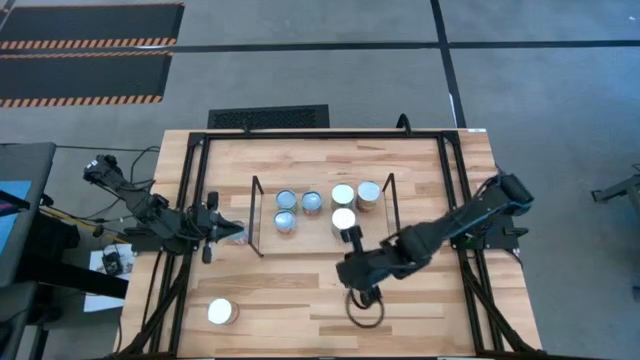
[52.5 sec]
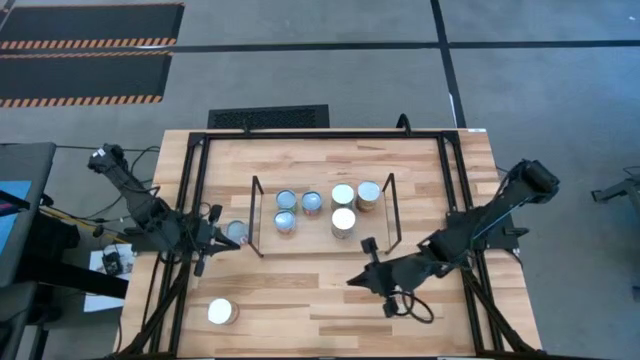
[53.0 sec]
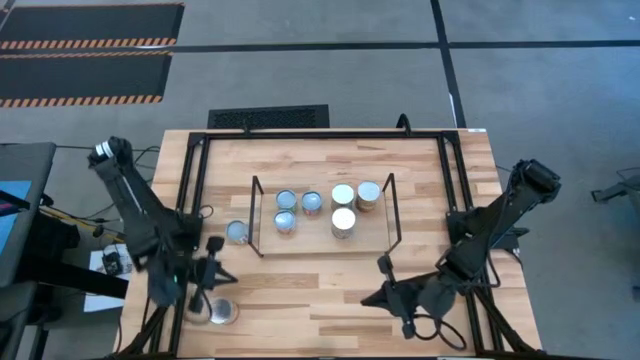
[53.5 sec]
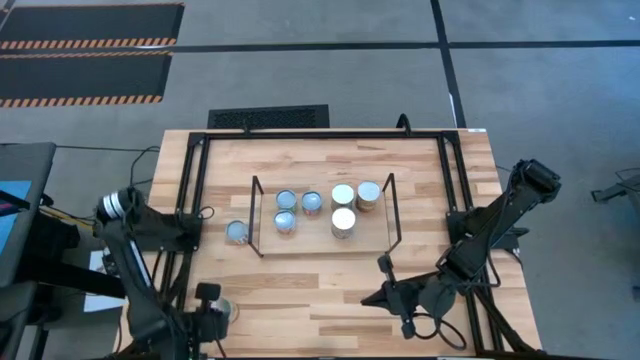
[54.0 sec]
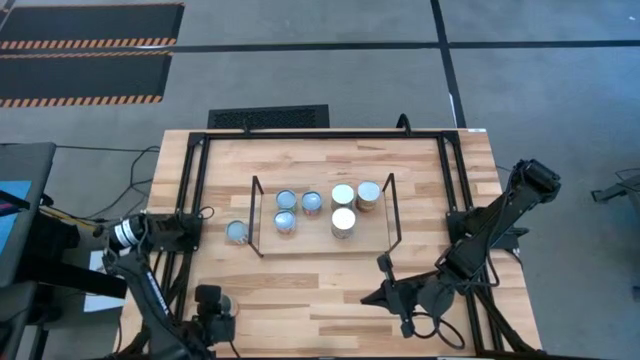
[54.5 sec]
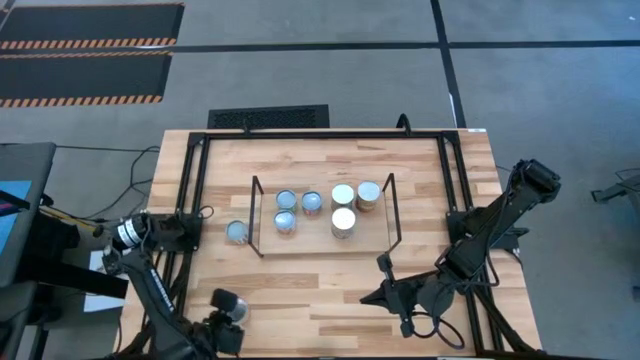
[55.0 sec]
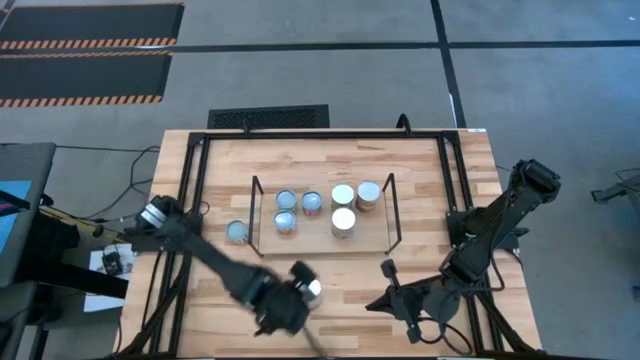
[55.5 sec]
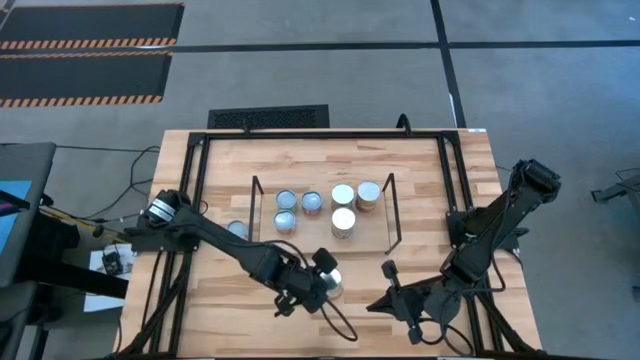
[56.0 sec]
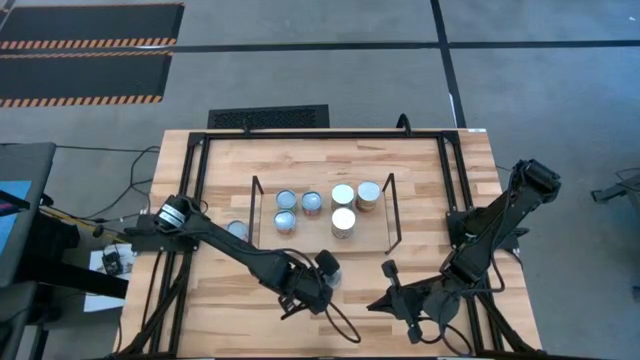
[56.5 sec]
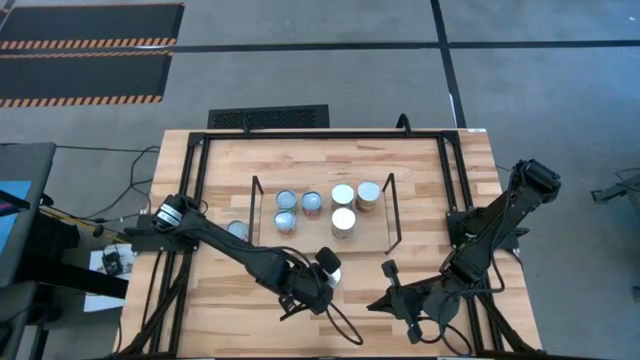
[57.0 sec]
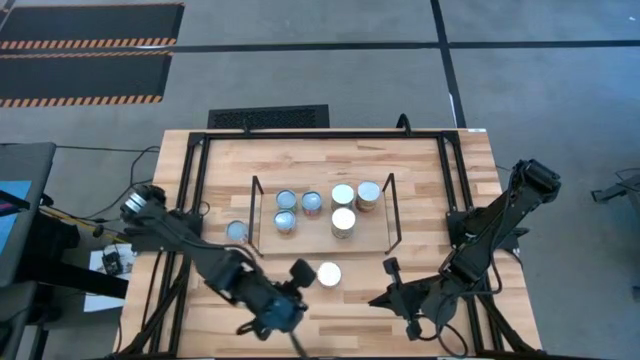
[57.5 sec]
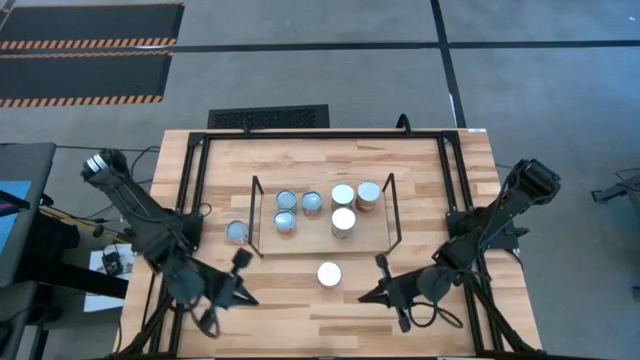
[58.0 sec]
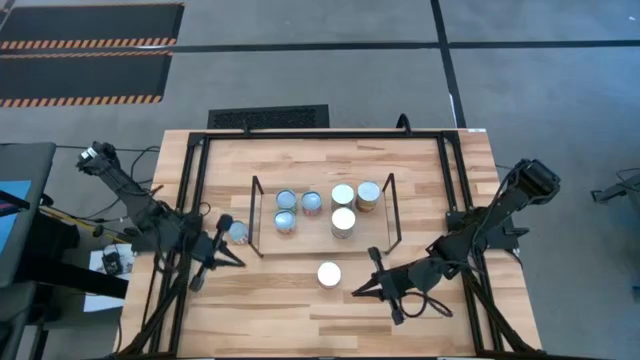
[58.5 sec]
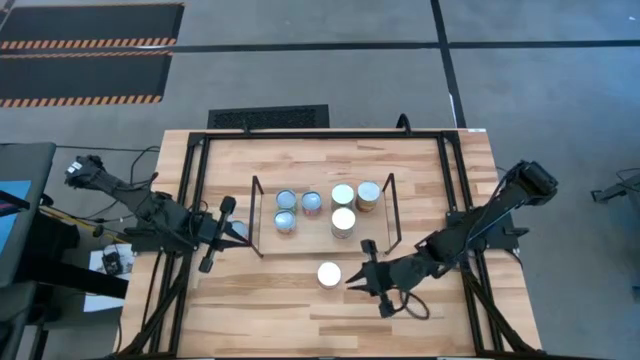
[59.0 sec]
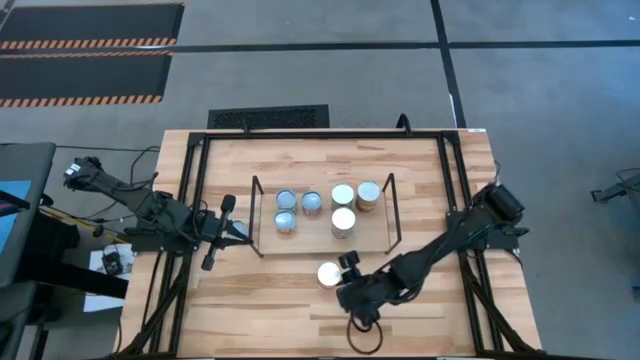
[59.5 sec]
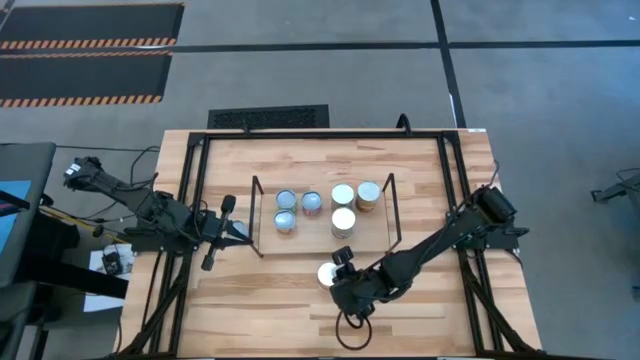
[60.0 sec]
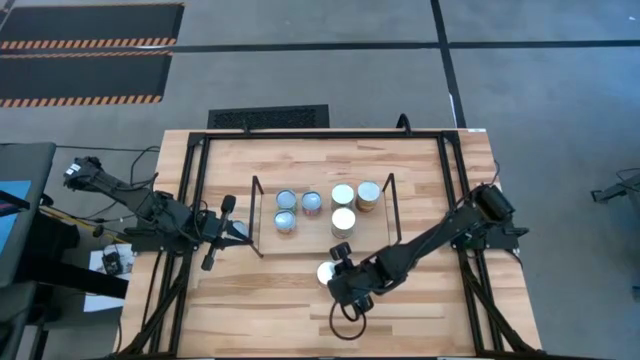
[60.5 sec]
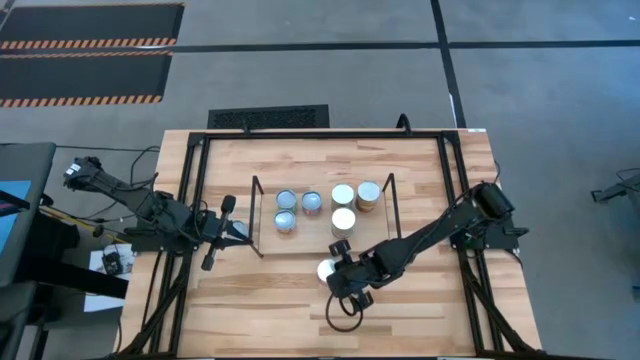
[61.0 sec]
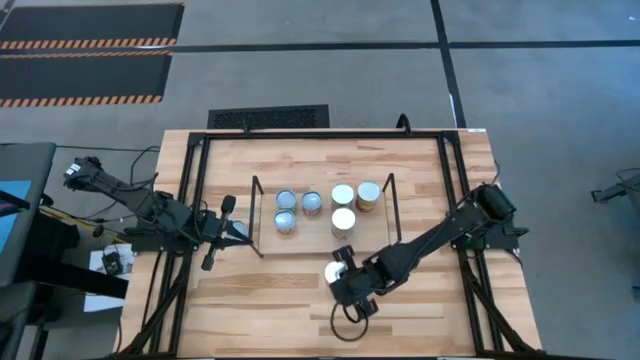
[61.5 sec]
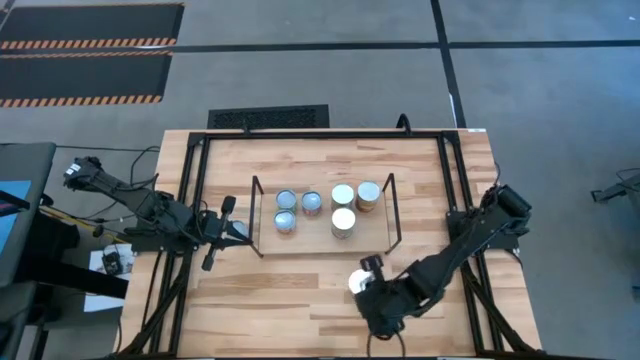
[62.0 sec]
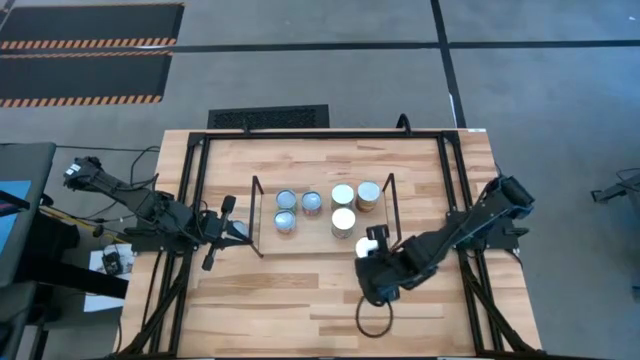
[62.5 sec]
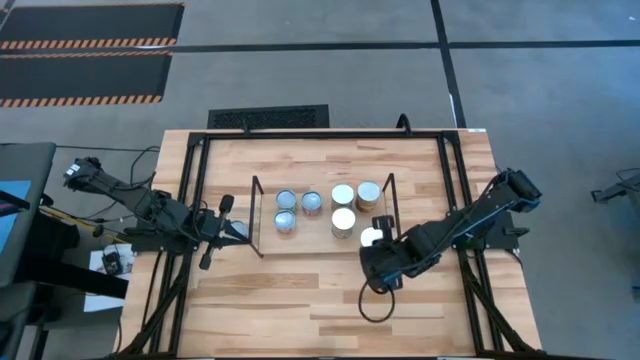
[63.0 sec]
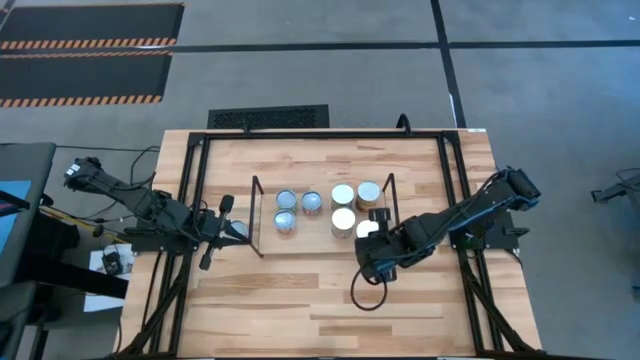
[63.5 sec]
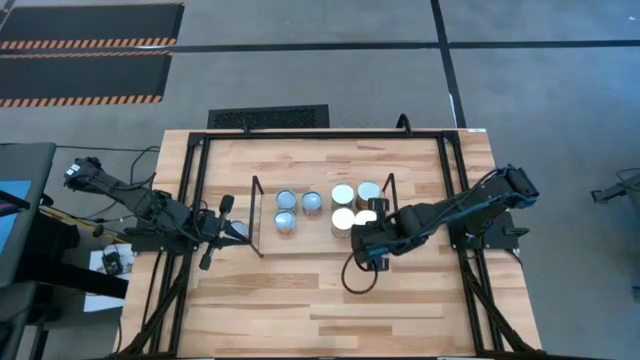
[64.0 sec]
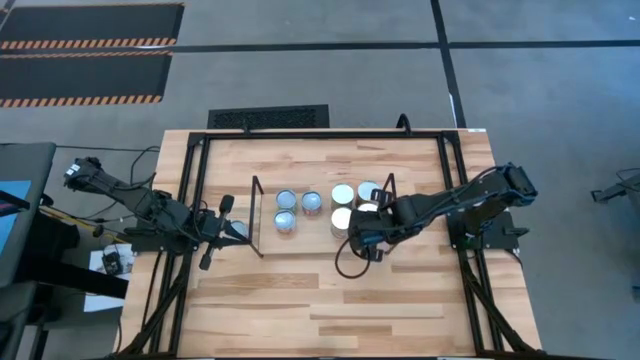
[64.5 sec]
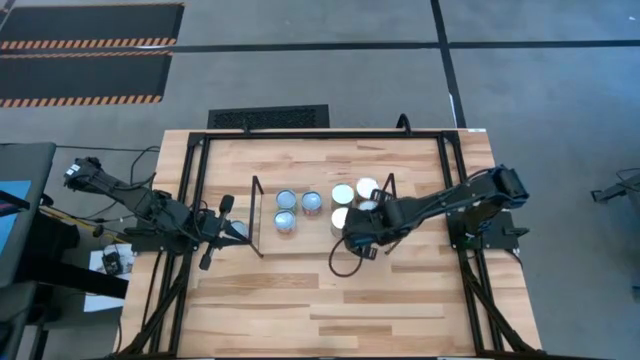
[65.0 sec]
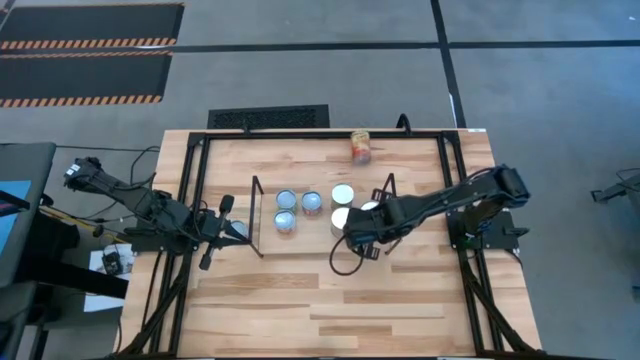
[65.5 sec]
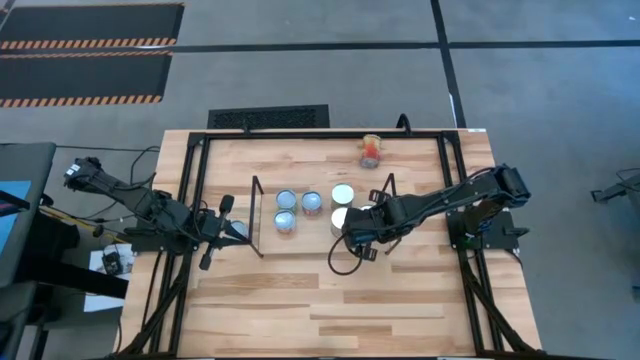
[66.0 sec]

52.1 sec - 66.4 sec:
Task: Pick and place cans onto a shelf
Put the large canned corn on the shelf aligned with the other canned corn

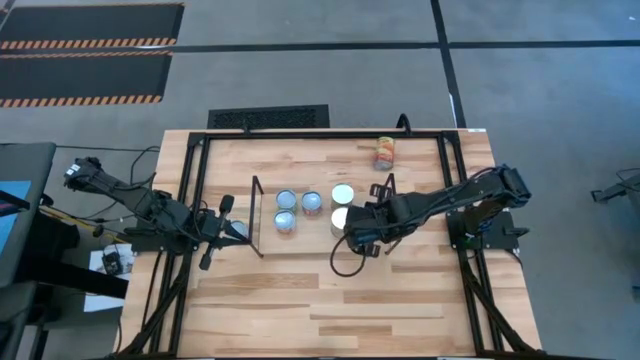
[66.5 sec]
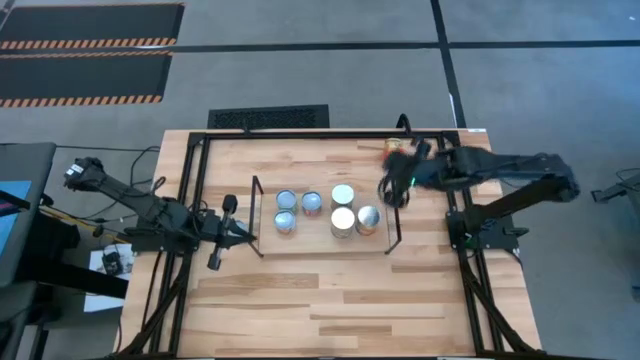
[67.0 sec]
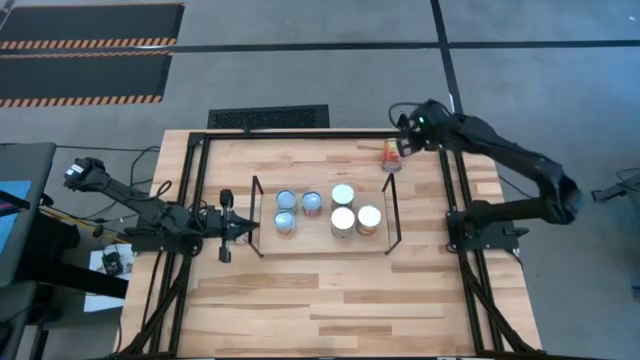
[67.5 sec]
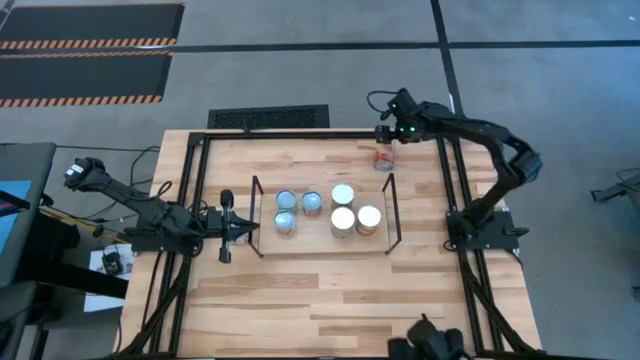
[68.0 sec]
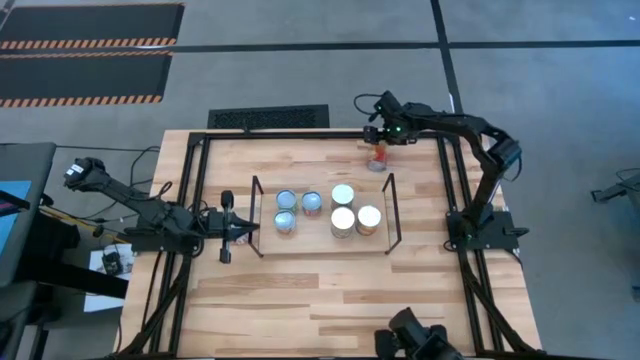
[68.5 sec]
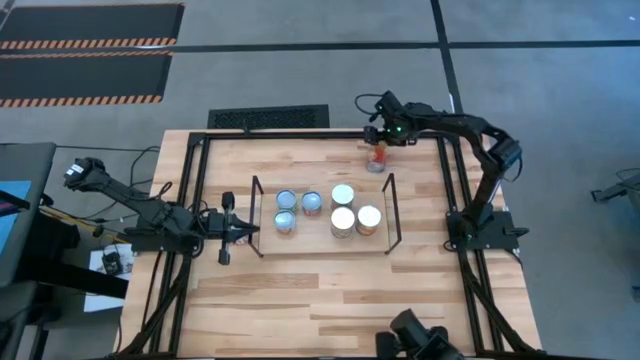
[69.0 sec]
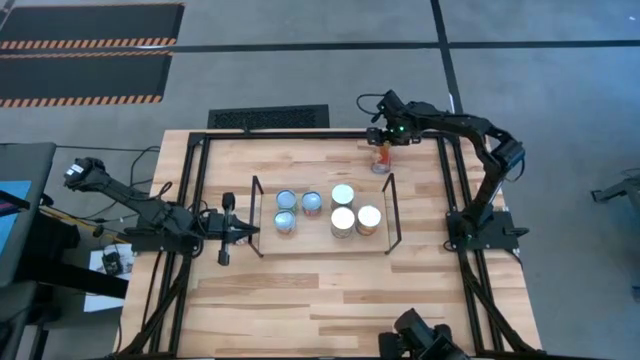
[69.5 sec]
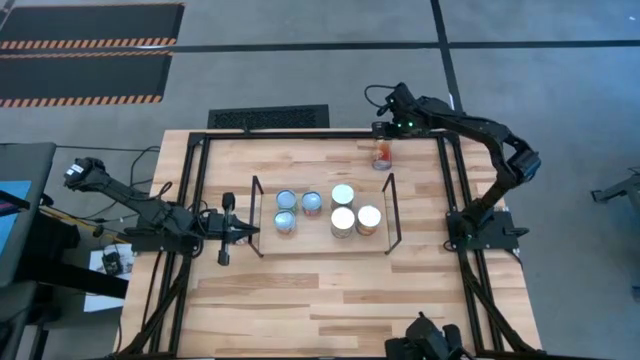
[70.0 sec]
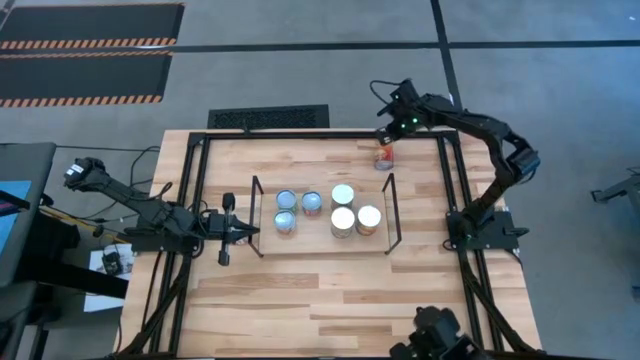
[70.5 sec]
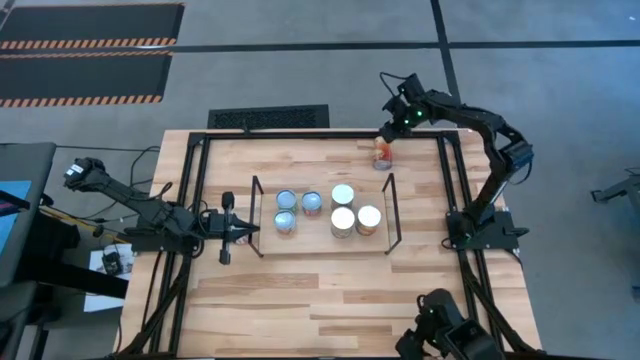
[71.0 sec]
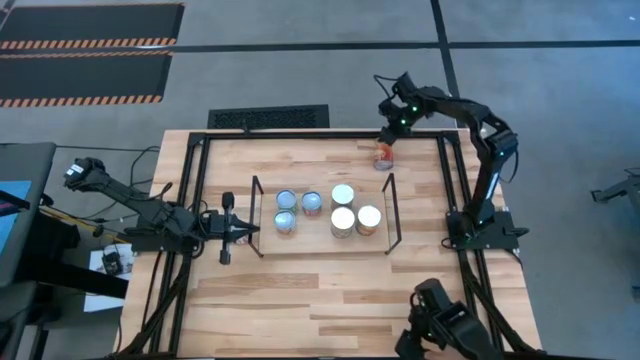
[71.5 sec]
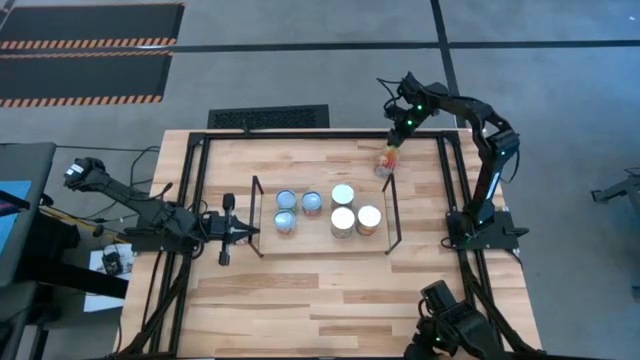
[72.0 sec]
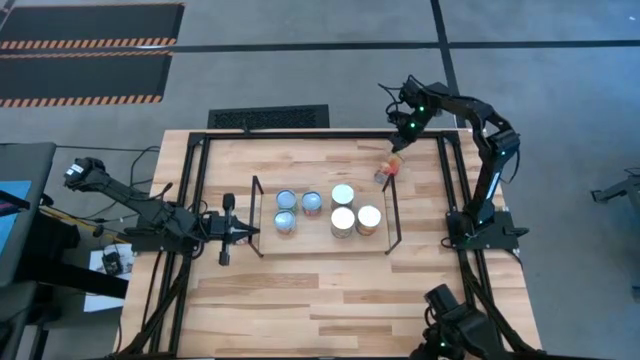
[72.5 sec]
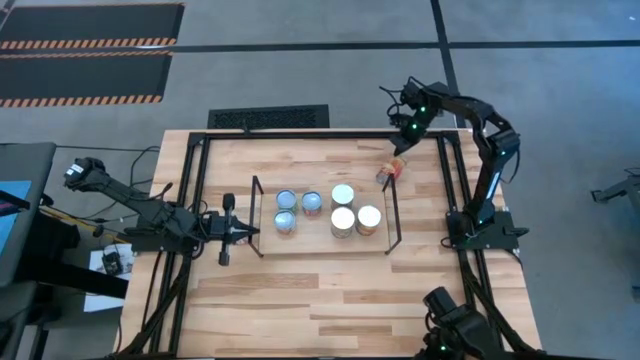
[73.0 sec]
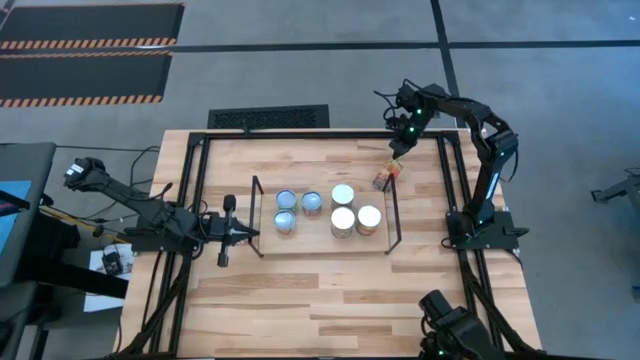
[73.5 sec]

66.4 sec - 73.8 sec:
Put the large canned corn on the shelf aligned with the other canned corn

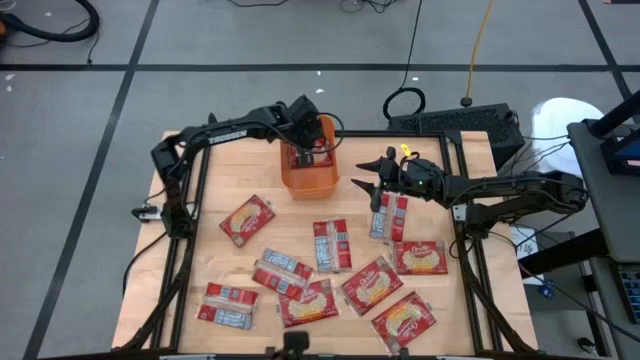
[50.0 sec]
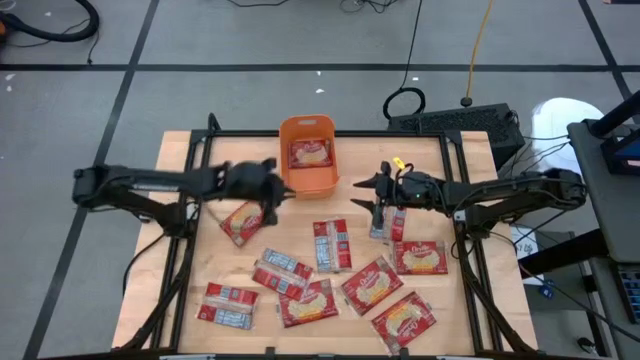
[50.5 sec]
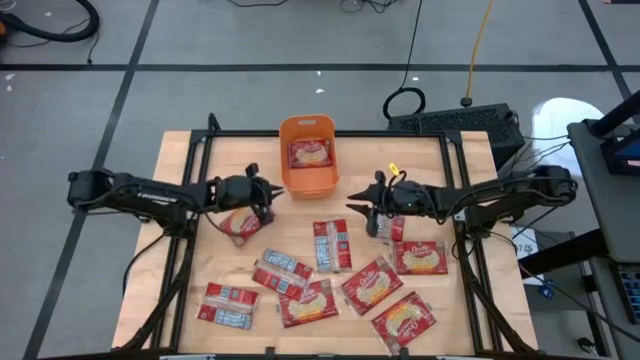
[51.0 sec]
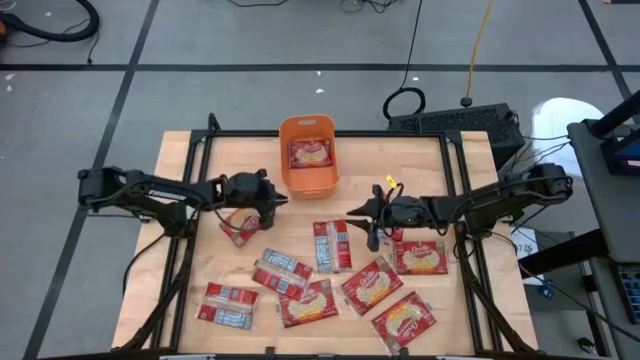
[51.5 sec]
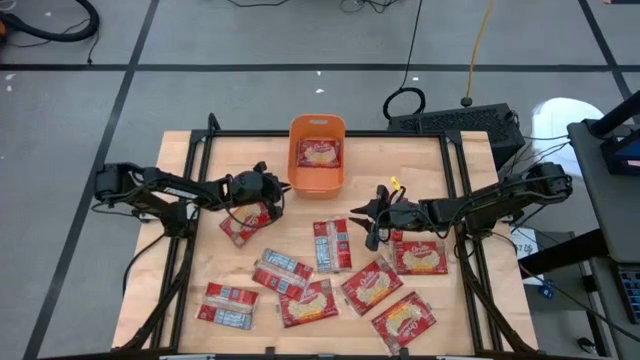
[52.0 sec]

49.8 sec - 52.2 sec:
Task: Sort popcorn bags into baskets
Adjust orange bin on the table
